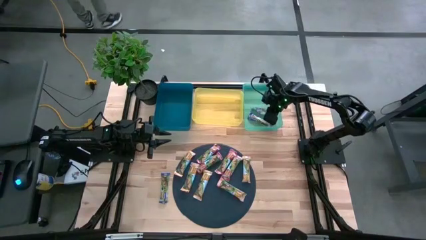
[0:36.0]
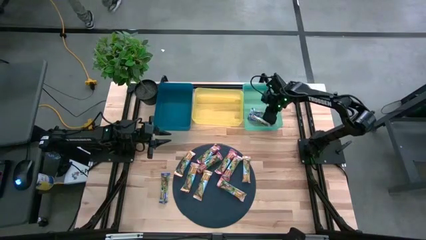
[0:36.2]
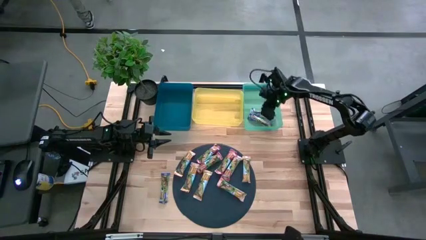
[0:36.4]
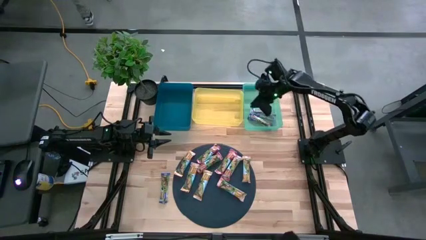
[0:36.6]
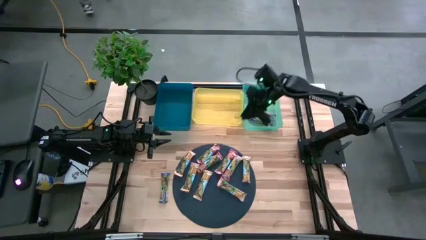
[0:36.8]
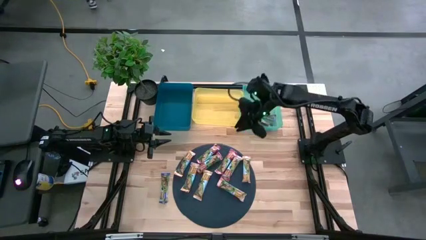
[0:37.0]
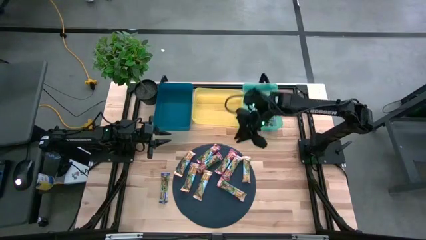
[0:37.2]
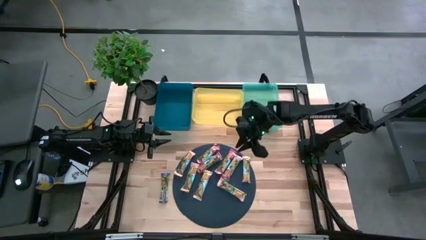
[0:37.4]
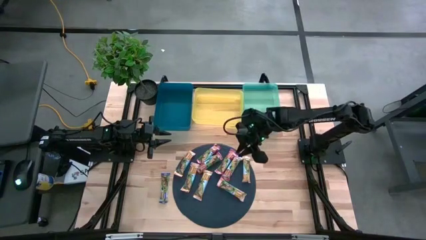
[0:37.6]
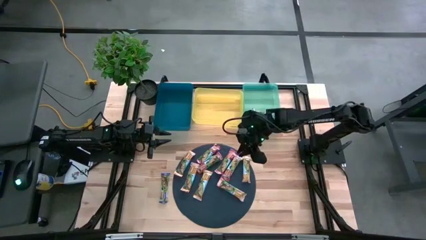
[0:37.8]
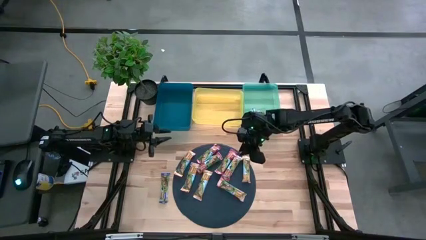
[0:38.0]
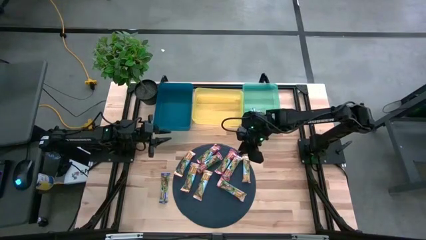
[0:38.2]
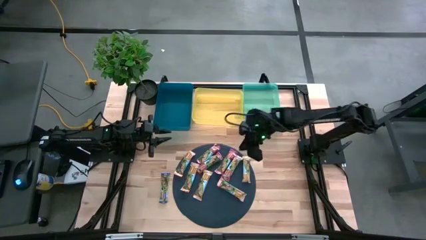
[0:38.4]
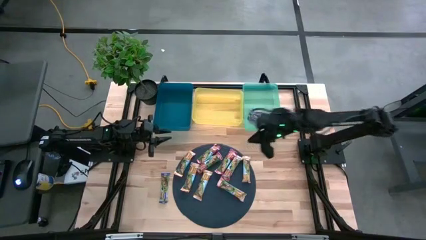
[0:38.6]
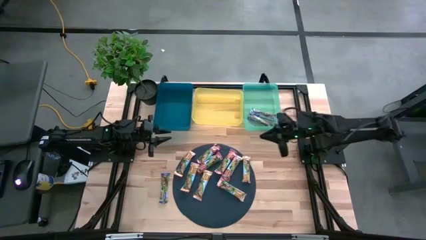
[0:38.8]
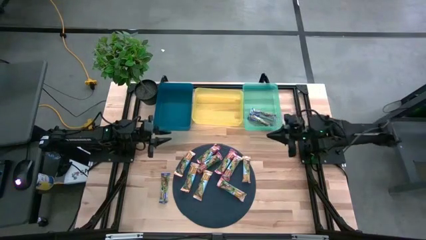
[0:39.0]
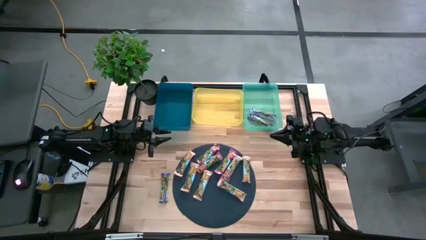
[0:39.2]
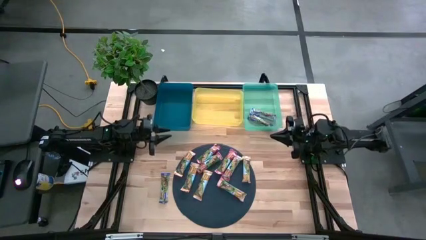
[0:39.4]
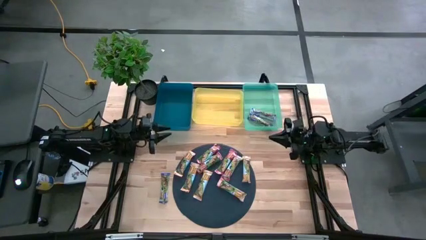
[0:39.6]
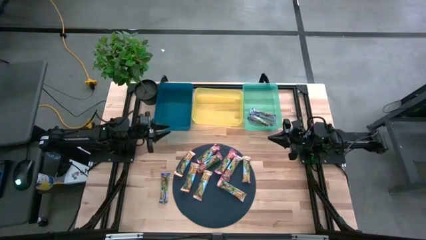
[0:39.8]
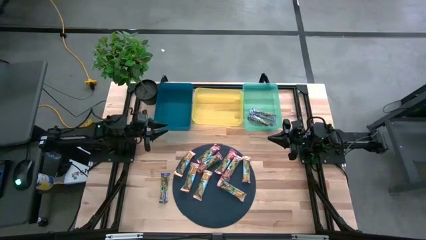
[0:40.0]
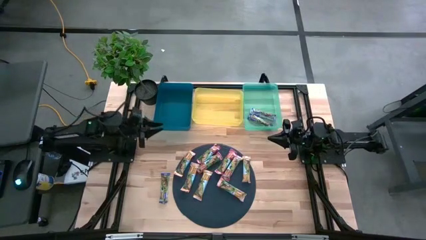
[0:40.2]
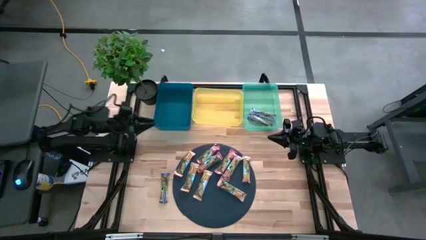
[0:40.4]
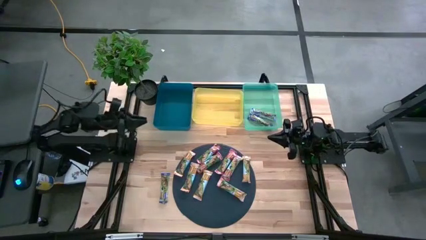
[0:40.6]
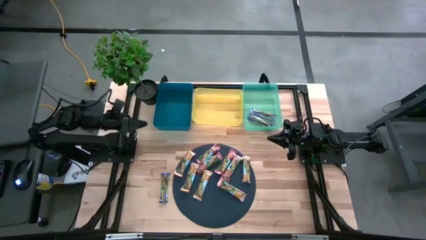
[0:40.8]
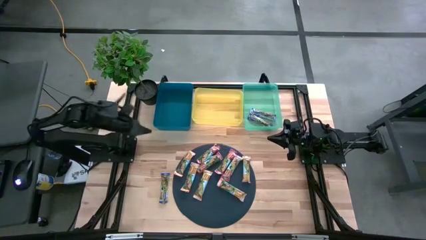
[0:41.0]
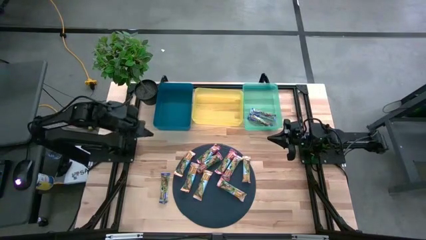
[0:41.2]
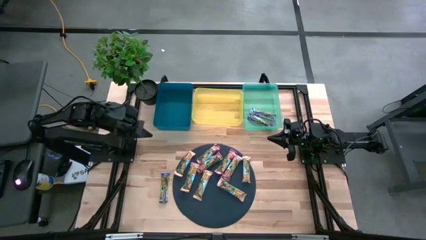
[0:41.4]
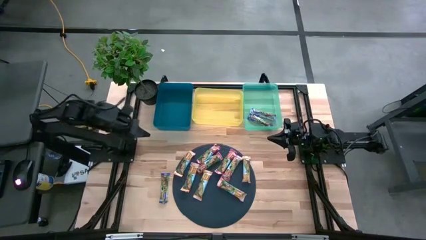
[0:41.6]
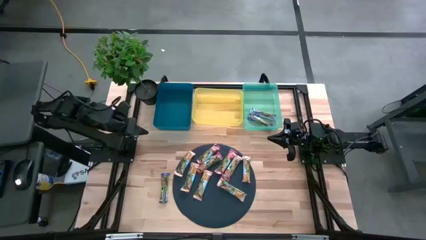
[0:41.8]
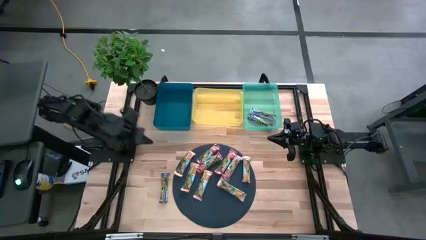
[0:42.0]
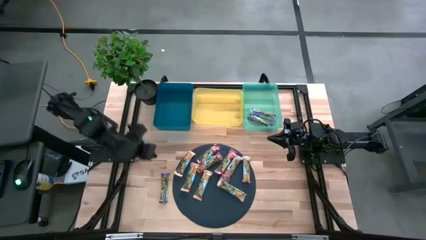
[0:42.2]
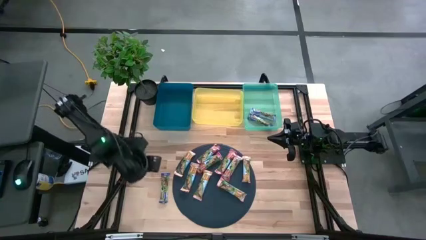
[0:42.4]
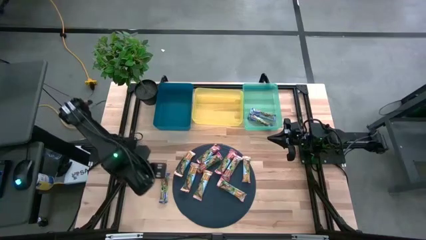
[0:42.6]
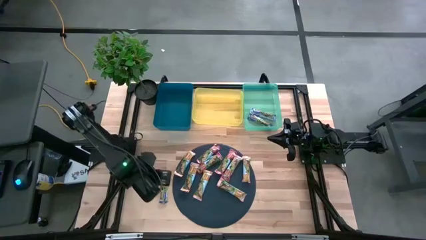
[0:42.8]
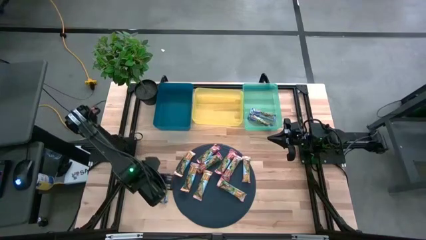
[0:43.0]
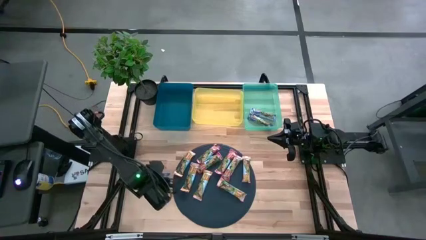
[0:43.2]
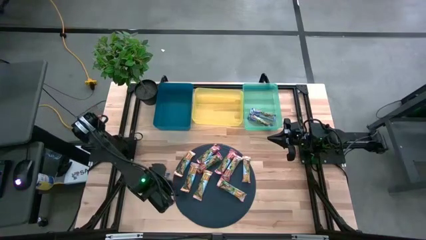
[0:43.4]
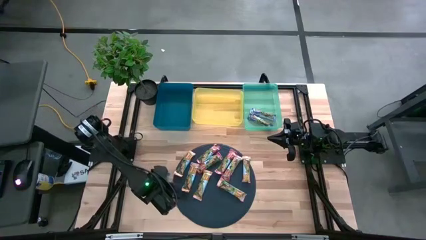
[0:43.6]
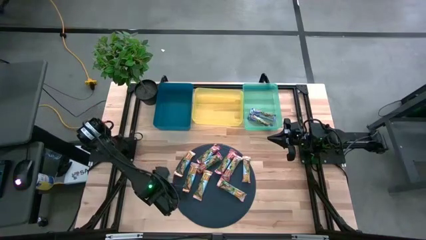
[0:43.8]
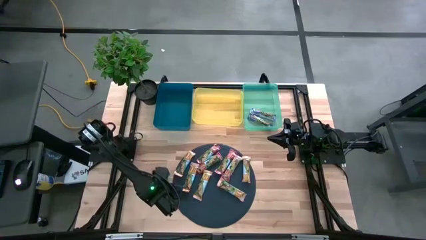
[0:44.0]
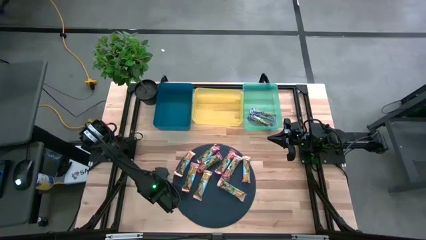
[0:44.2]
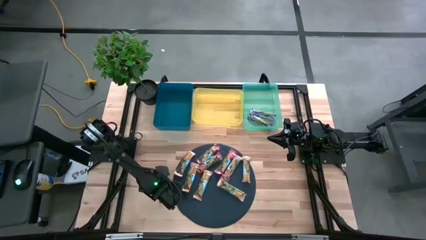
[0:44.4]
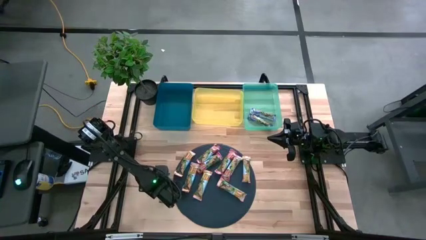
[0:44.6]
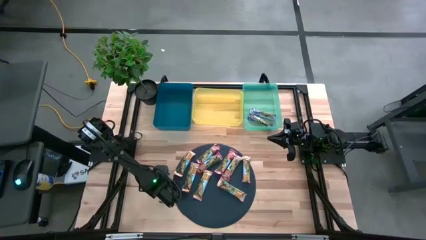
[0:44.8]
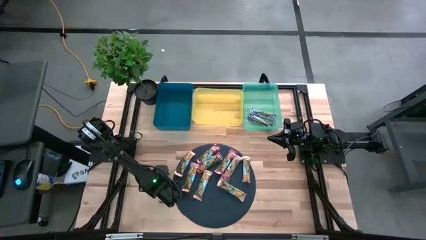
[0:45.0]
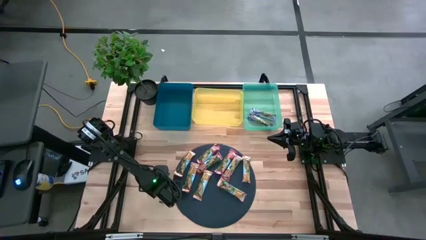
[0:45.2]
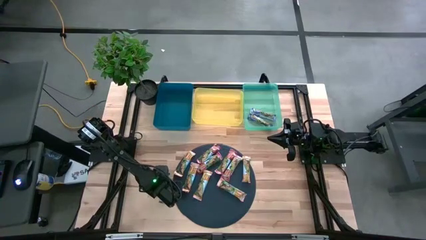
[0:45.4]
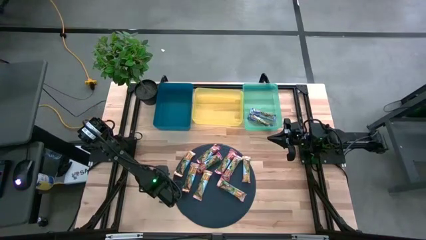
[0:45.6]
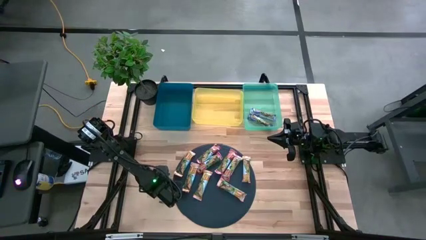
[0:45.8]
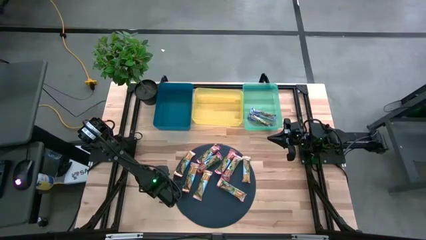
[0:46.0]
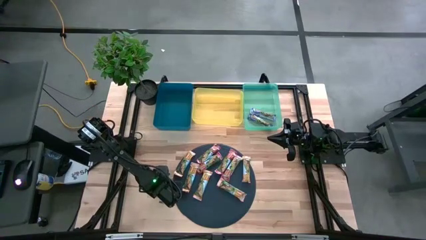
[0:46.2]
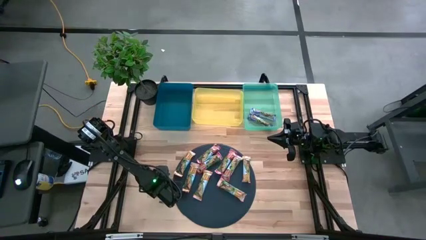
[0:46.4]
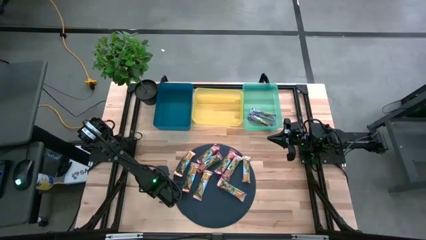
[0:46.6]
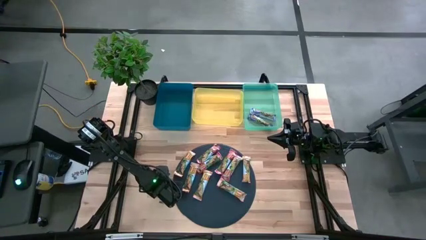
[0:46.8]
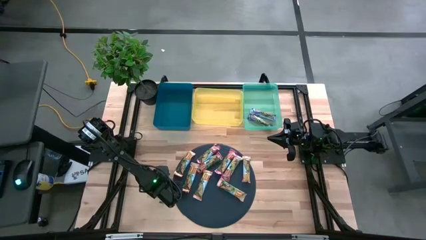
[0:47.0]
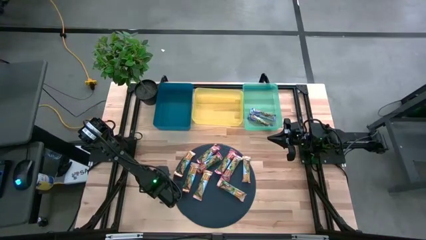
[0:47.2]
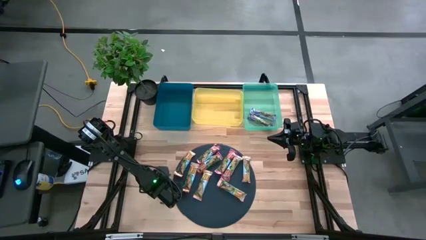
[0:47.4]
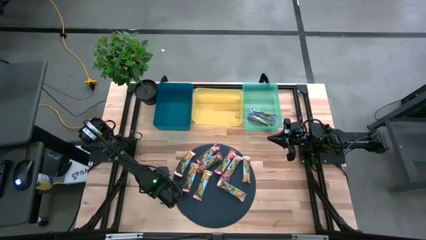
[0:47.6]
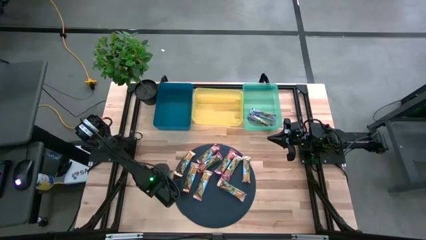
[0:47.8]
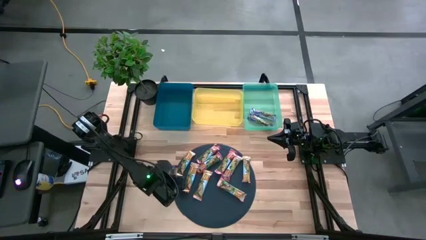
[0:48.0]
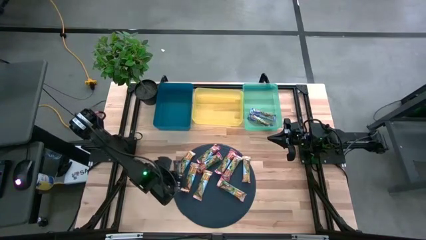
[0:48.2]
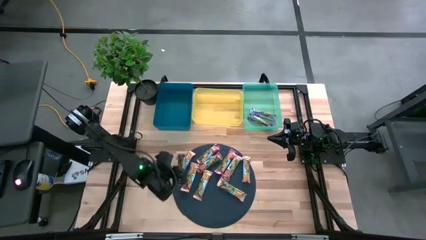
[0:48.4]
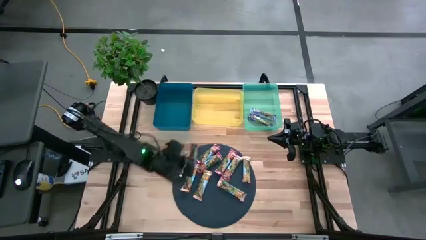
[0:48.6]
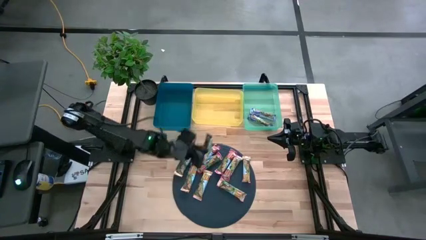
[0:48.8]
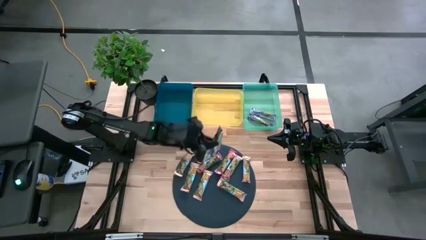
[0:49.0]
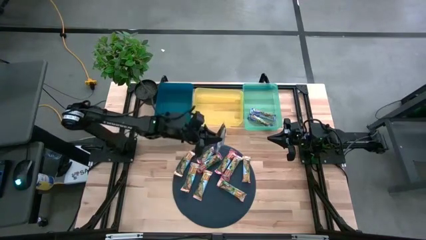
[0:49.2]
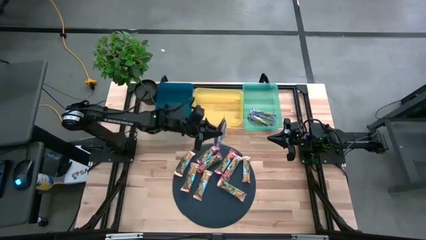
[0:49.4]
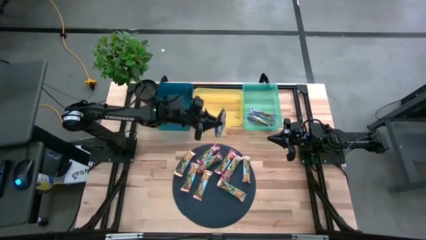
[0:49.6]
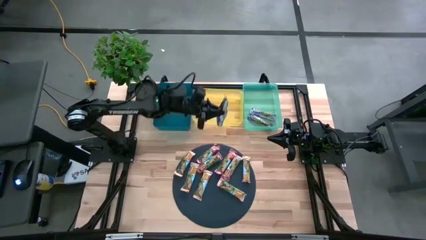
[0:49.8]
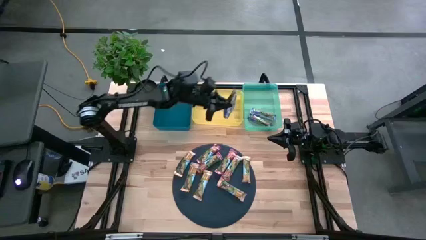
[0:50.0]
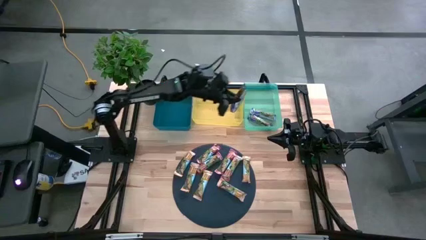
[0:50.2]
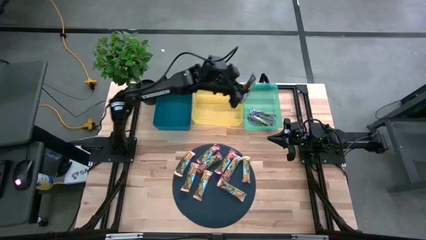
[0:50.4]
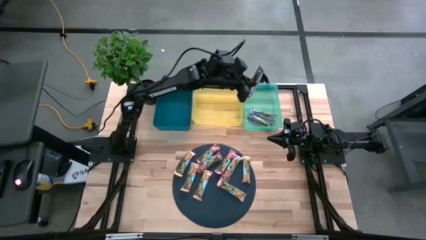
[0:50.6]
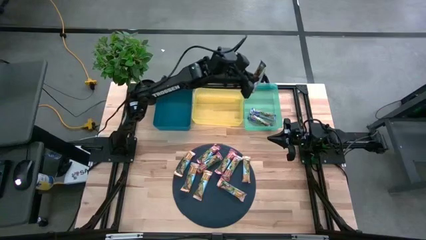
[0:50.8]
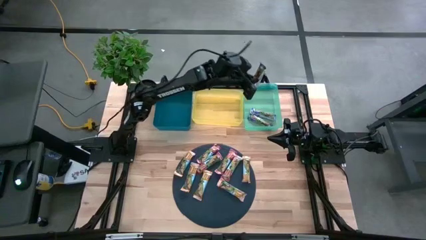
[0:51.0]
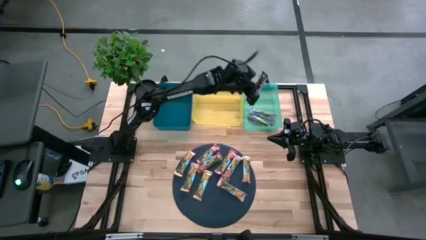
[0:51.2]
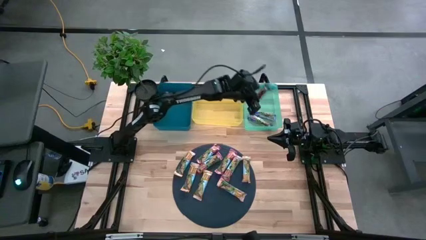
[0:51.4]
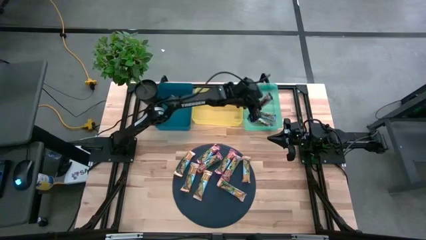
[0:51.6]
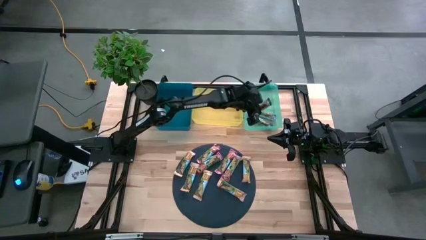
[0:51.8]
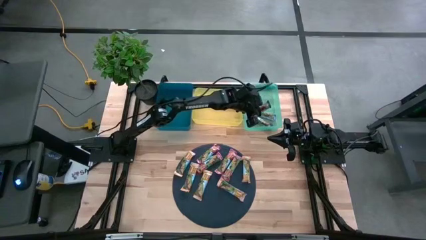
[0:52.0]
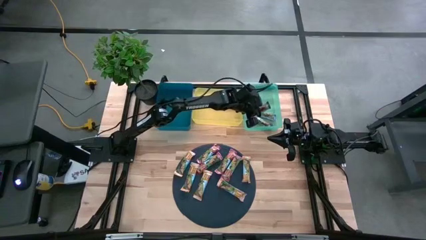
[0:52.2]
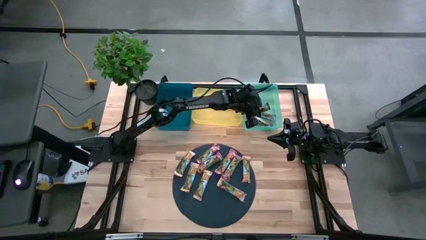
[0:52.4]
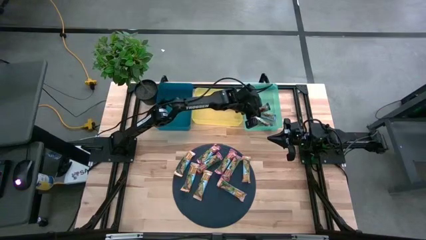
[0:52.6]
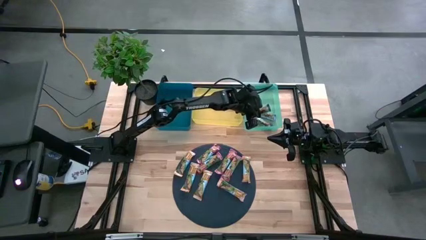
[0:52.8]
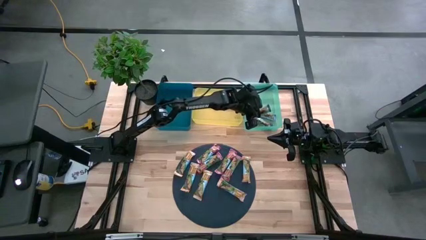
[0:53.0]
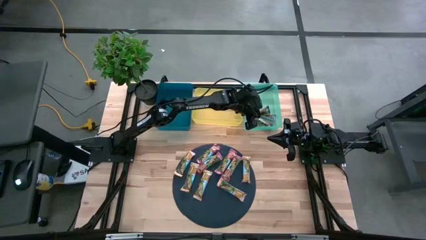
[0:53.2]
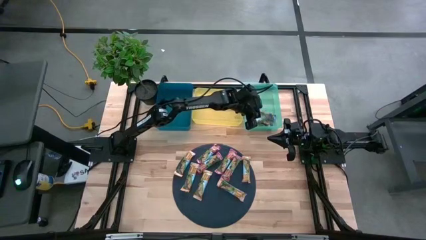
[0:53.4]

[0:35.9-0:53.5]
Task: Pick and place Granola Bars by type
Put the blue granola bar into the green bin
